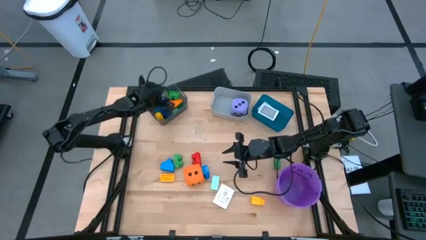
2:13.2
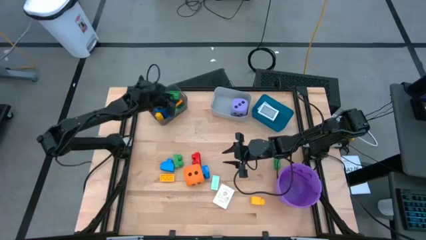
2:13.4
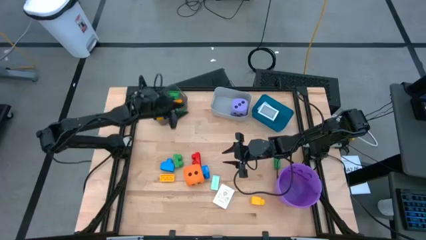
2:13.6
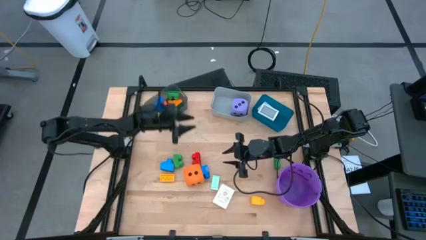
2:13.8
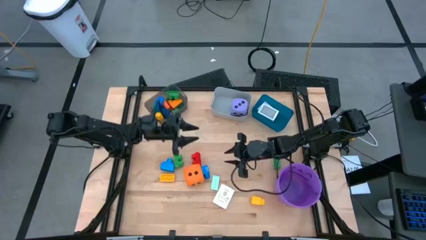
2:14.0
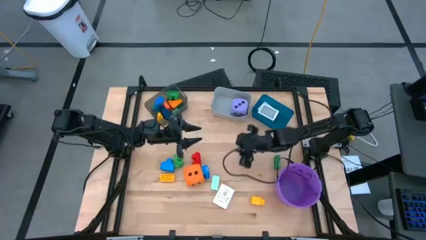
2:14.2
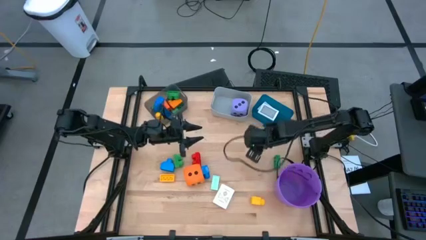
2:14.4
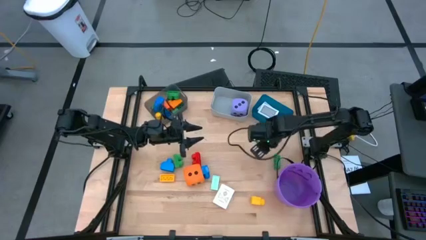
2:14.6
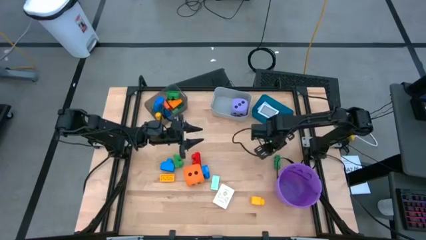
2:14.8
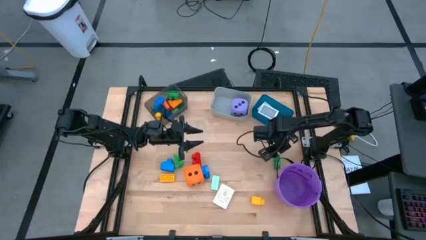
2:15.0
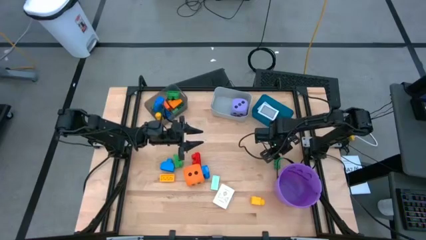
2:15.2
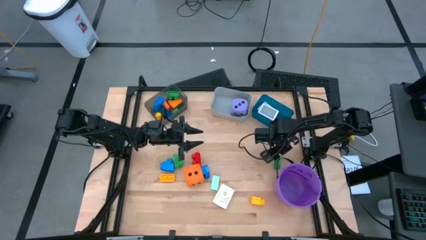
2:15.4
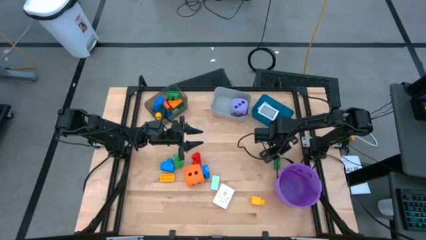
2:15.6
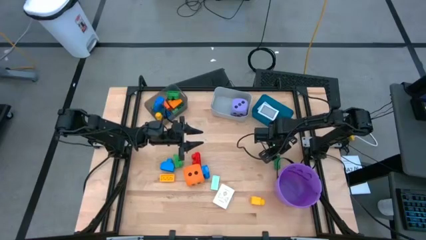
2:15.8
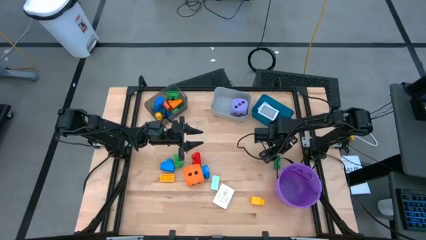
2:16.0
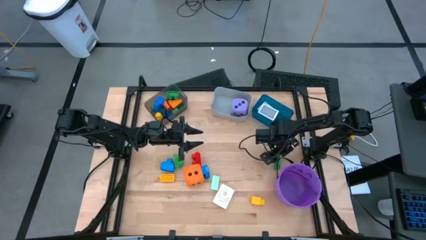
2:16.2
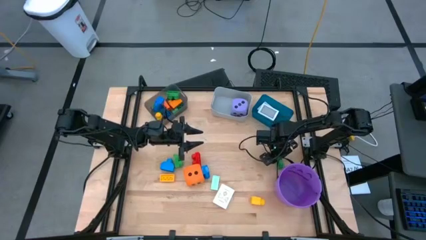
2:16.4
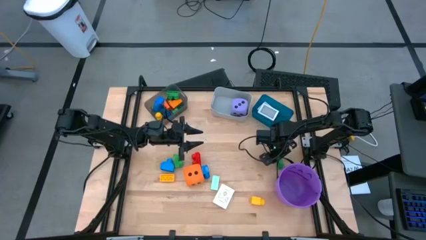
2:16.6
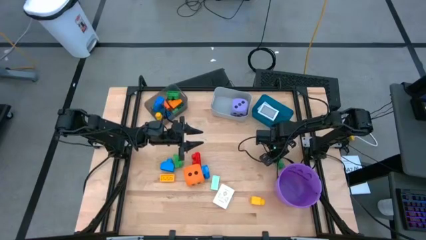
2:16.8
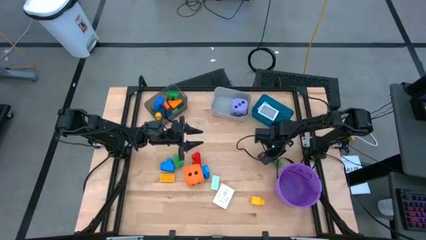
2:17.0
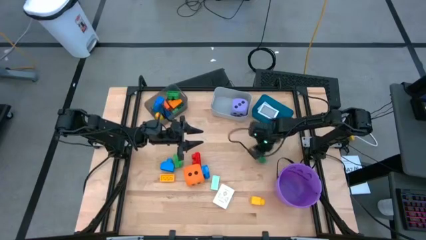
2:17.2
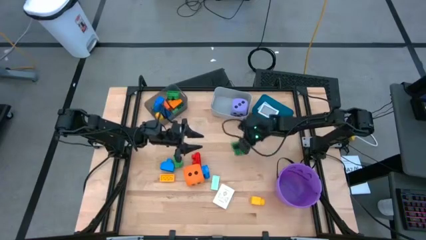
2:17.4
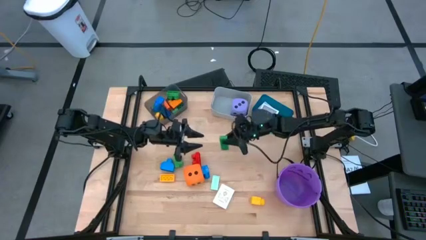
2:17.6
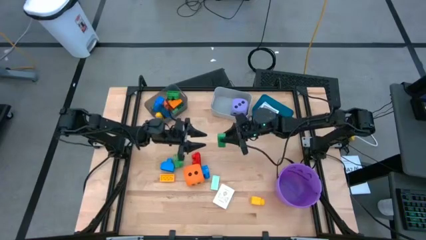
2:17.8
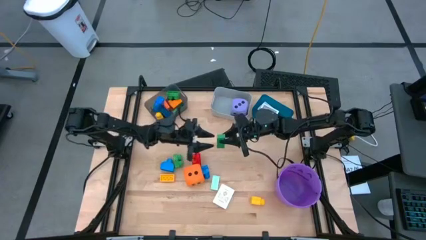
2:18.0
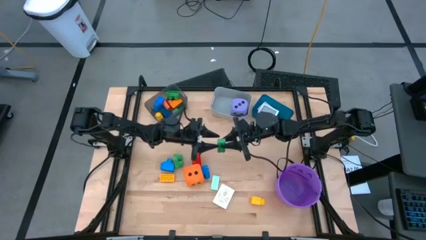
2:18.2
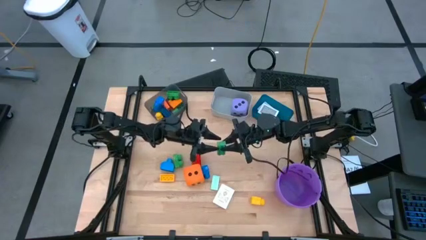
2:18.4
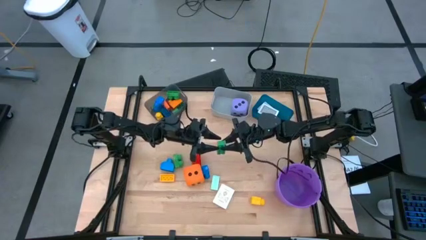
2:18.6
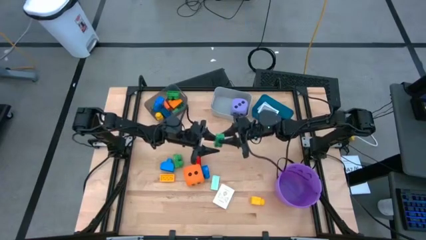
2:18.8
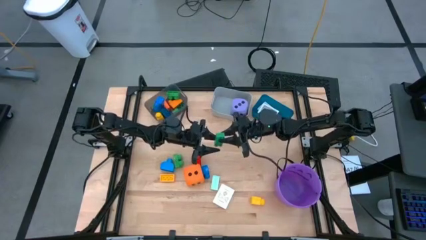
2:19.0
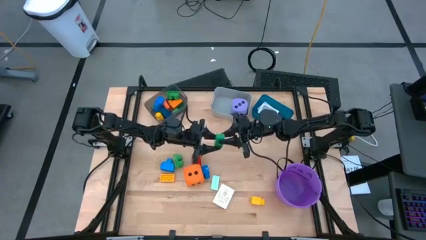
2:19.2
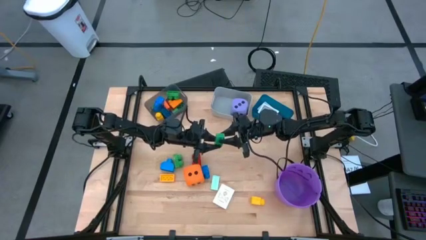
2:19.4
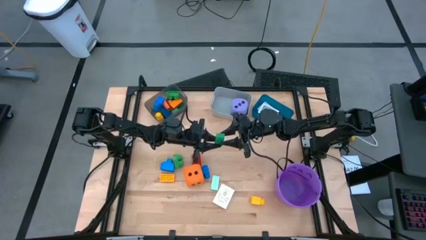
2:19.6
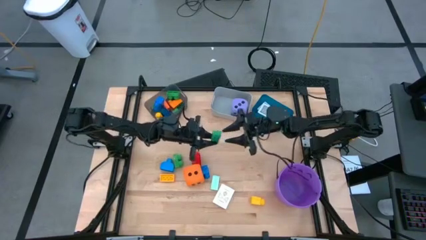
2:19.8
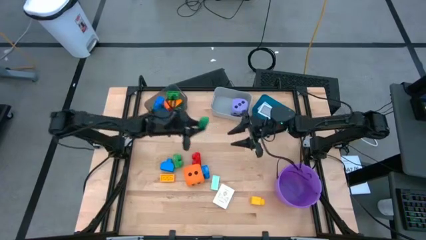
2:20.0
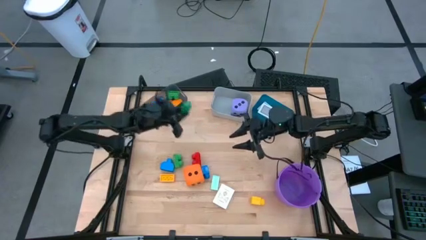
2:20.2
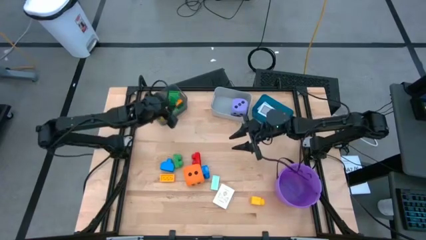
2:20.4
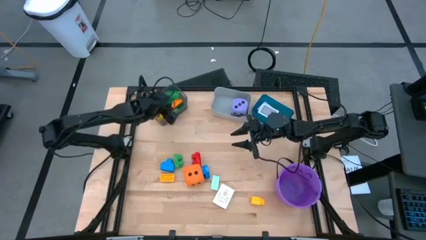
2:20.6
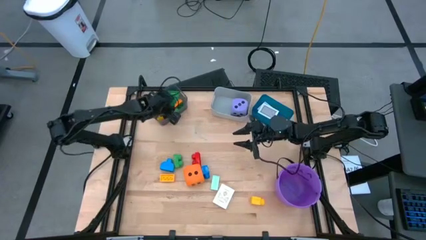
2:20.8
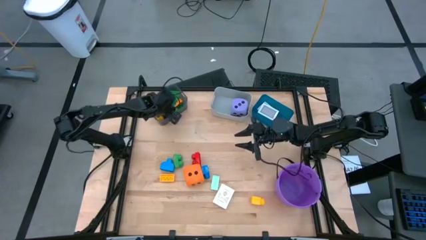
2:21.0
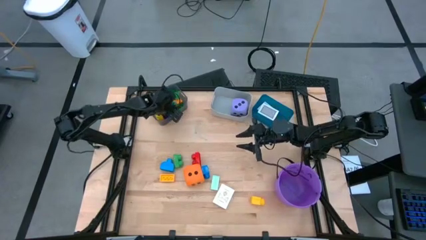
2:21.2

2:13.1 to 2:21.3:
Task: Pick & Place Toys
Put the green gamepiece into the black bin

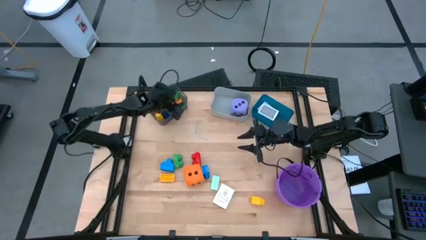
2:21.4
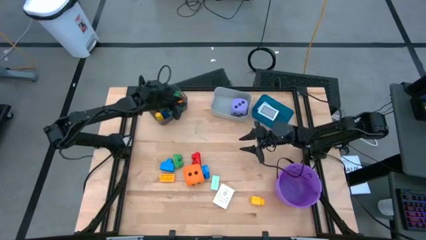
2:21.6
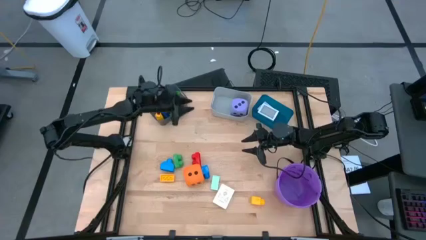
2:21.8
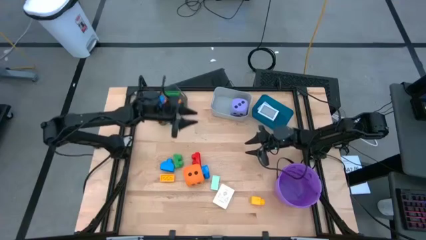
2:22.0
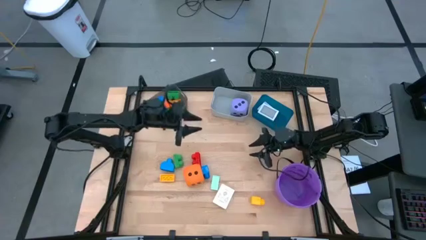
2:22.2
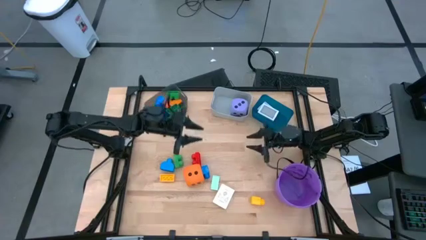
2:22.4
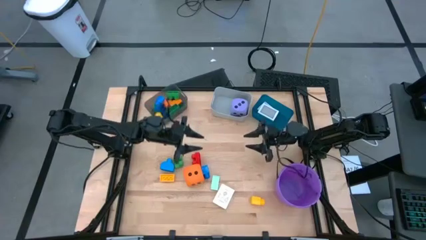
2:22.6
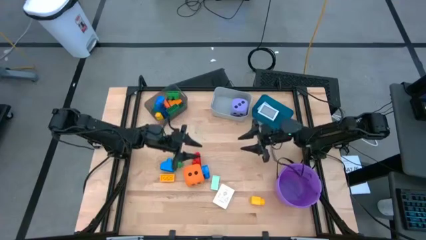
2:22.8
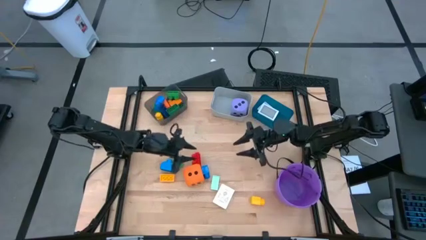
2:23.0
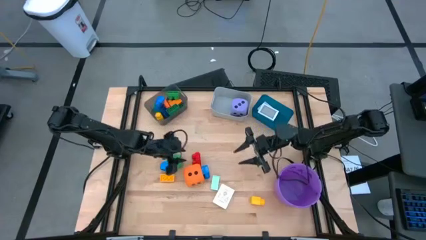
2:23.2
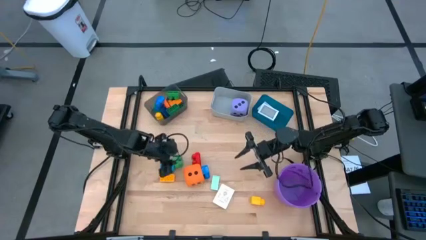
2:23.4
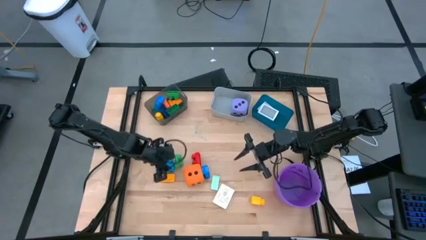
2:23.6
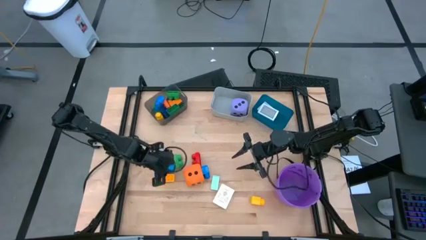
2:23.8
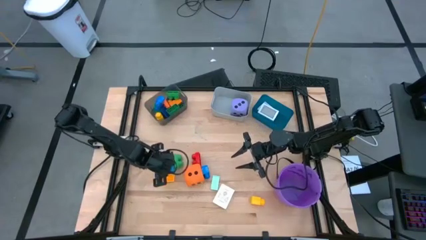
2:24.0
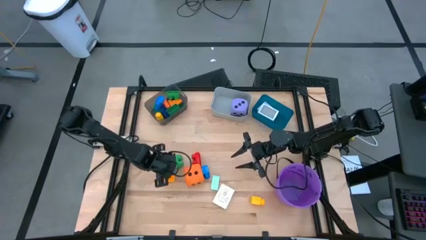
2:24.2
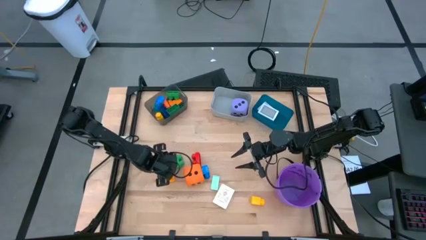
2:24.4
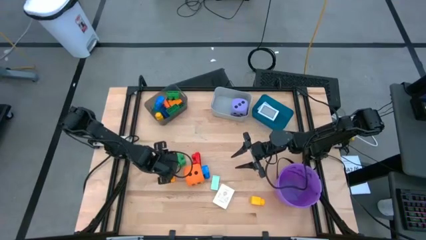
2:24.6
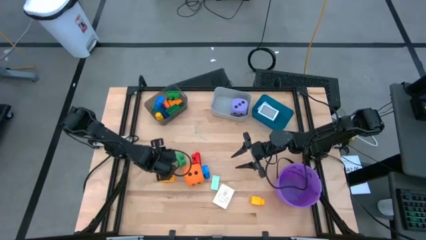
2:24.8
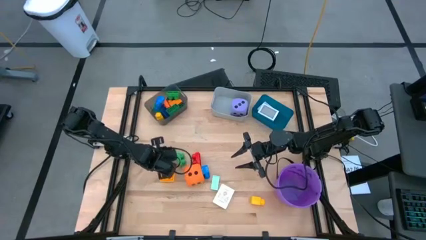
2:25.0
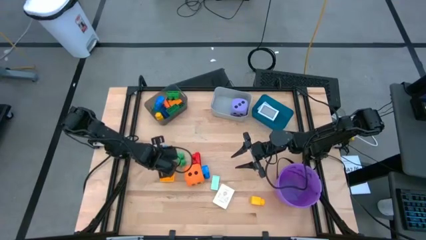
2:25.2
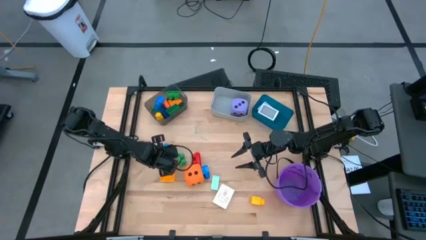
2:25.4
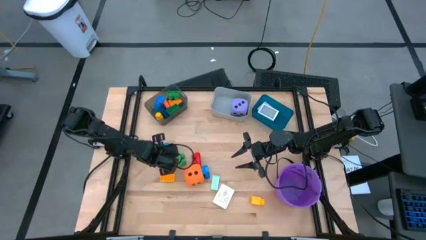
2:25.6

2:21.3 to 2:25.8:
Put the blue gamepiece into the black bin

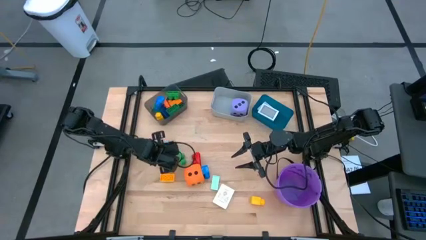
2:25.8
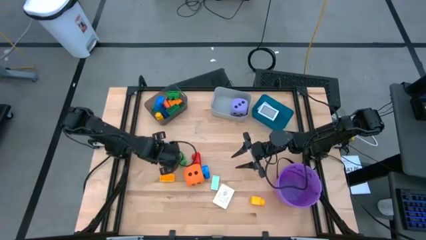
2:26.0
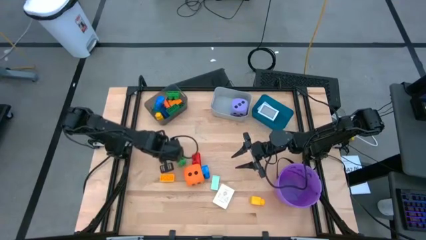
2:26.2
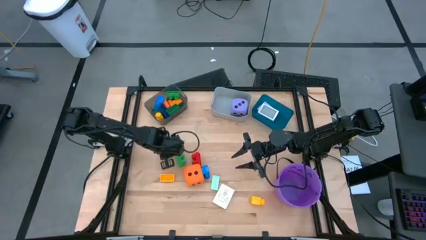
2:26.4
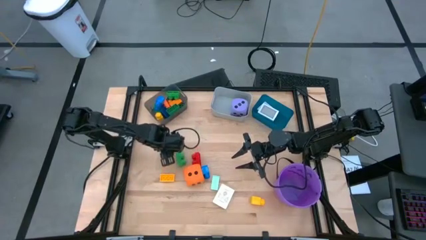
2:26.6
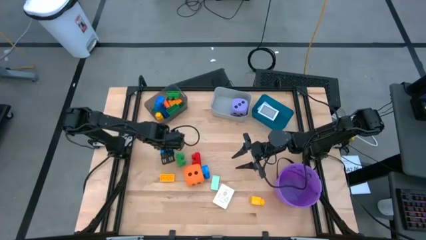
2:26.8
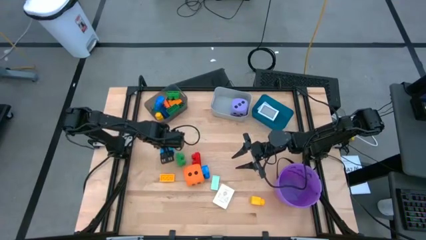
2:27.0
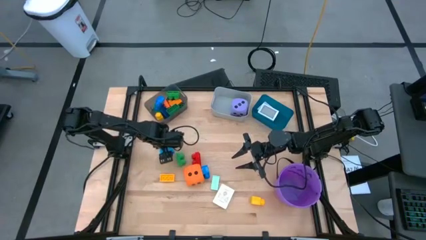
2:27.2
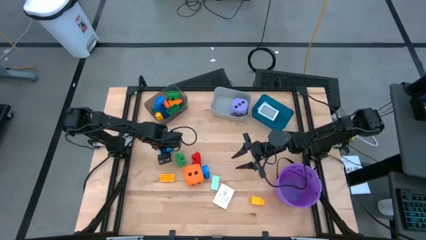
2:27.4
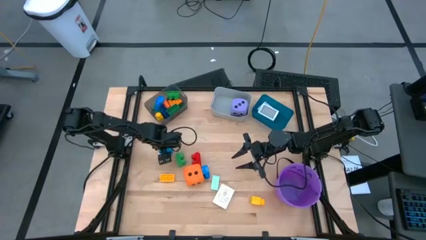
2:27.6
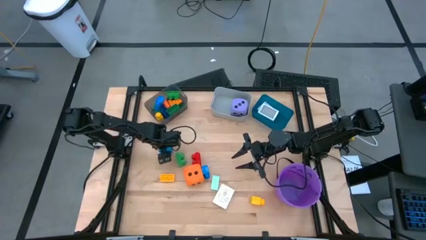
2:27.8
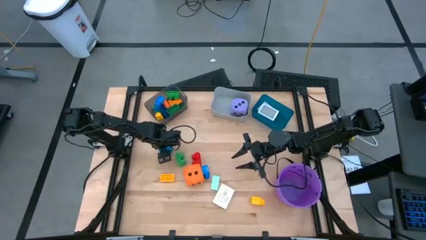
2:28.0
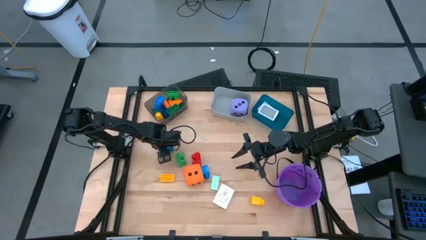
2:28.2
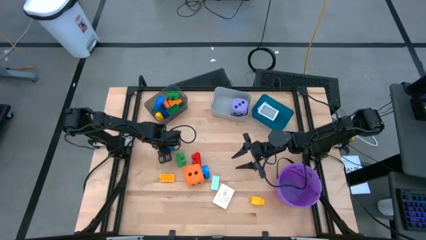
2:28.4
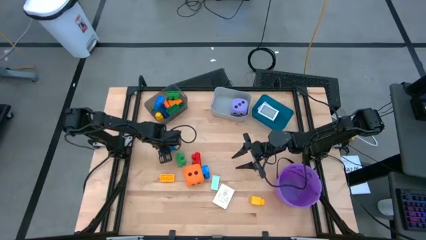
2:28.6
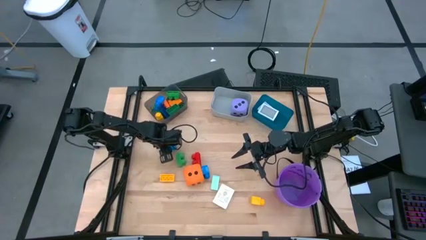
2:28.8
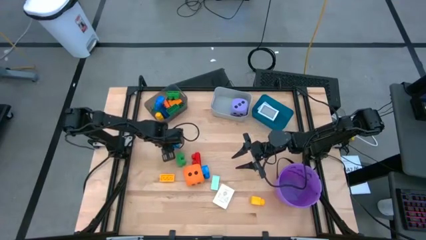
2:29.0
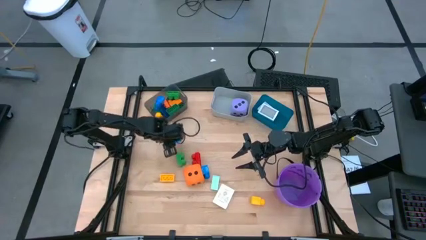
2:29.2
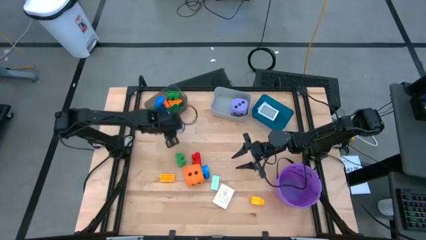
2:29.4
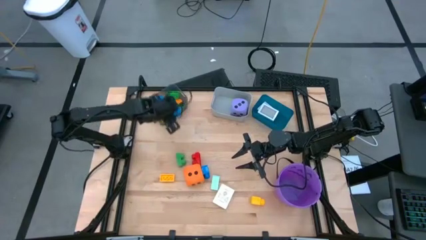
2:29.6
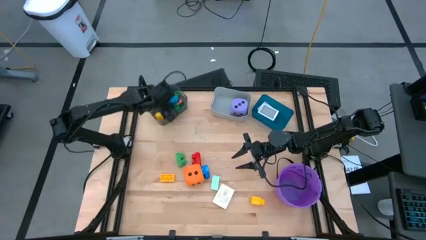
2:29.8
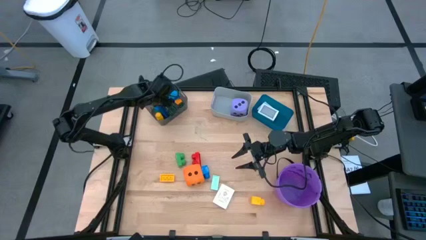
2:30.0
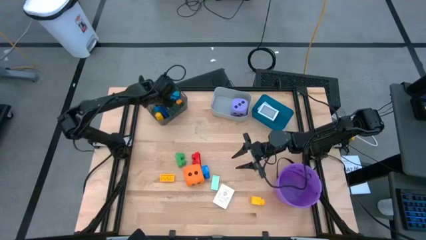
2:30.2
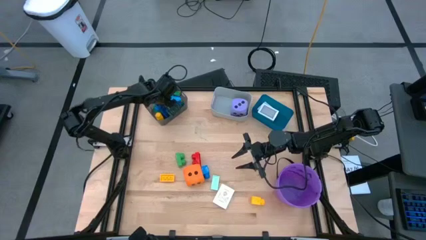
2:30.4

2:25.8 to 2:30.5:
Put the blue gamepiece into the black bin
